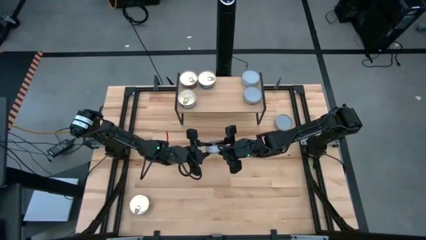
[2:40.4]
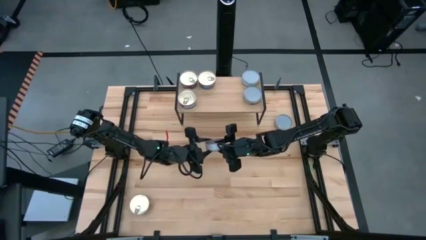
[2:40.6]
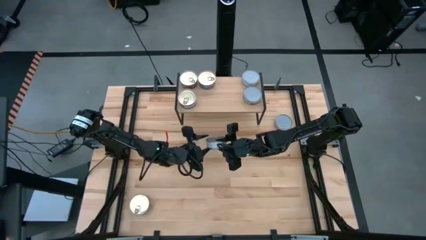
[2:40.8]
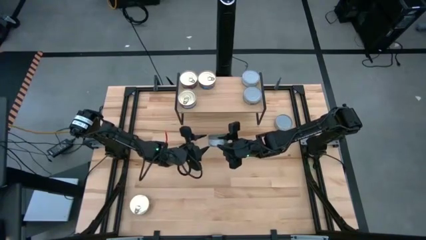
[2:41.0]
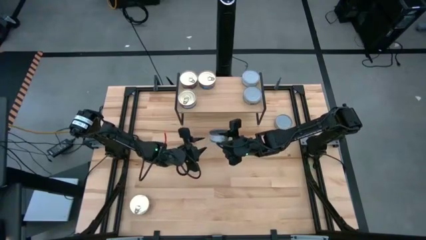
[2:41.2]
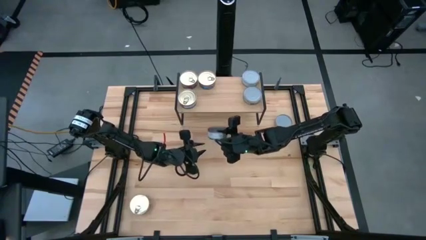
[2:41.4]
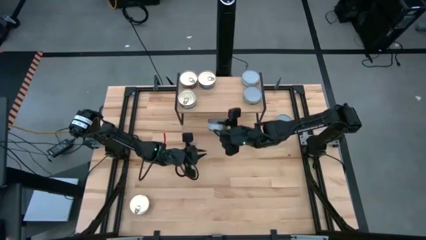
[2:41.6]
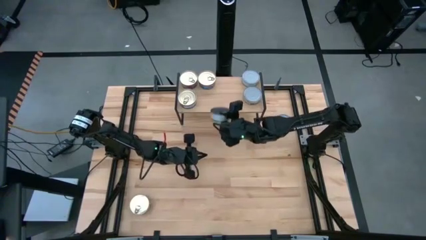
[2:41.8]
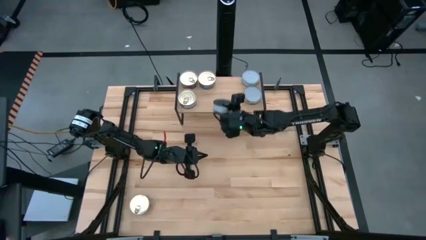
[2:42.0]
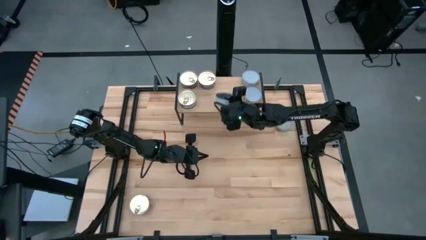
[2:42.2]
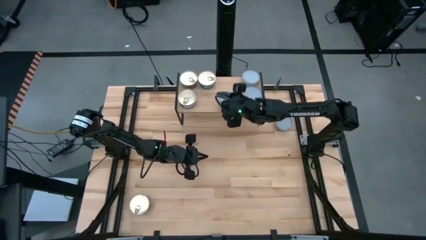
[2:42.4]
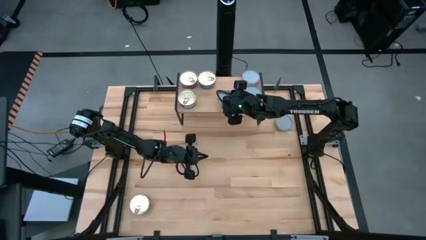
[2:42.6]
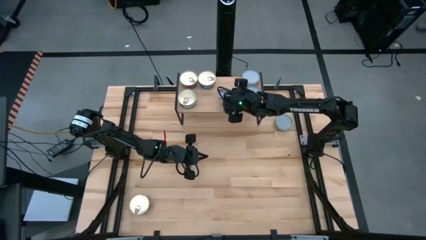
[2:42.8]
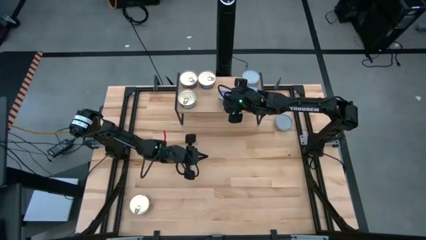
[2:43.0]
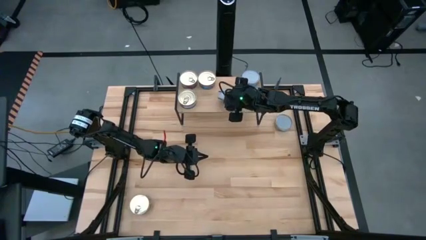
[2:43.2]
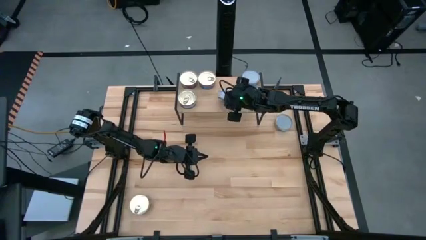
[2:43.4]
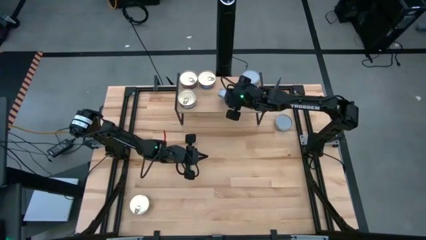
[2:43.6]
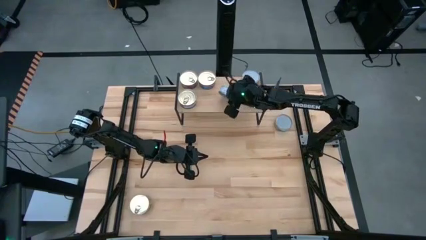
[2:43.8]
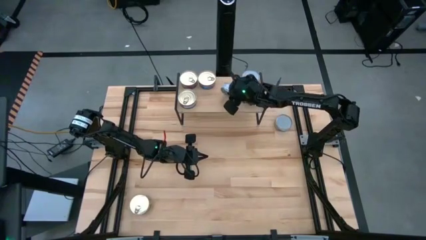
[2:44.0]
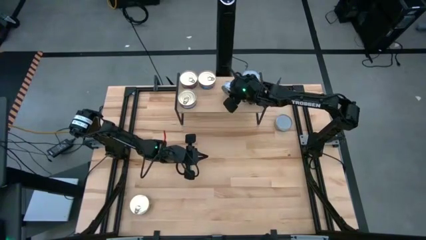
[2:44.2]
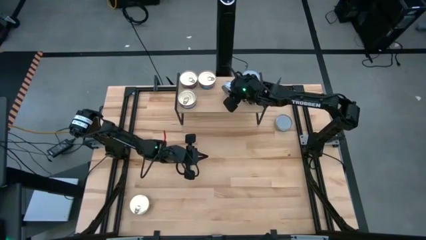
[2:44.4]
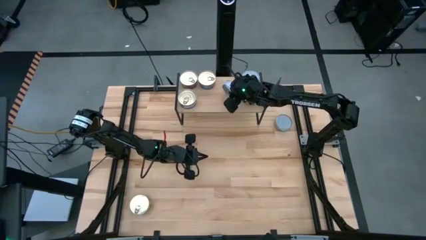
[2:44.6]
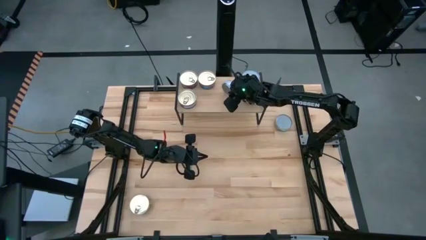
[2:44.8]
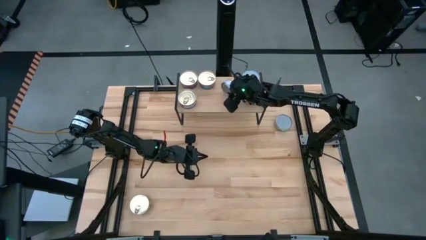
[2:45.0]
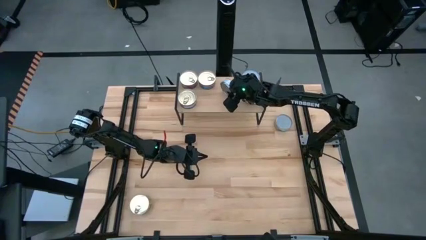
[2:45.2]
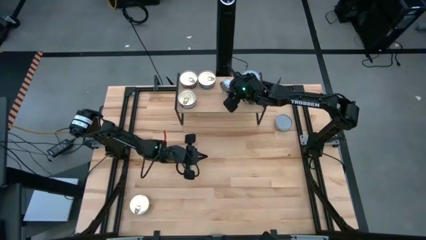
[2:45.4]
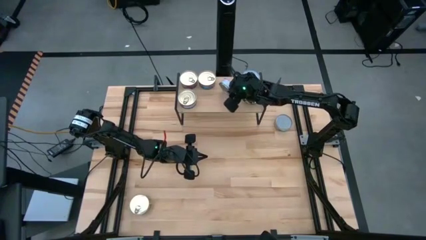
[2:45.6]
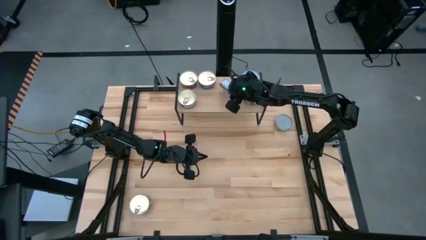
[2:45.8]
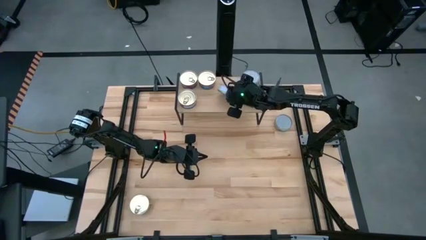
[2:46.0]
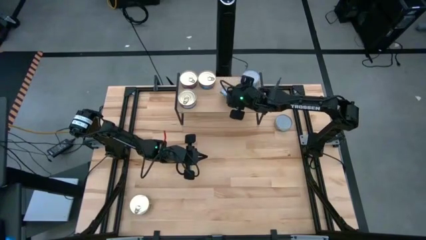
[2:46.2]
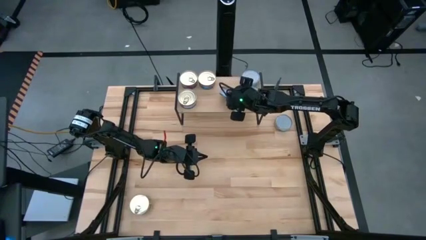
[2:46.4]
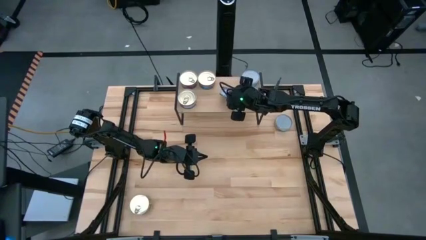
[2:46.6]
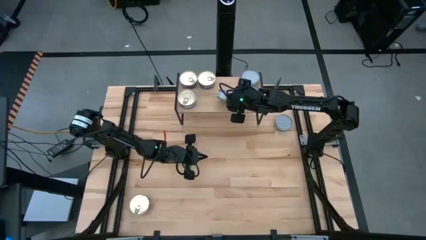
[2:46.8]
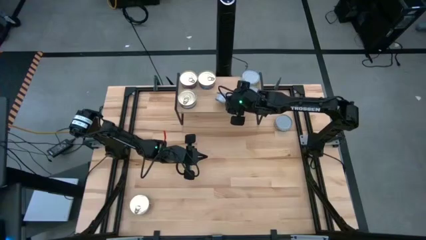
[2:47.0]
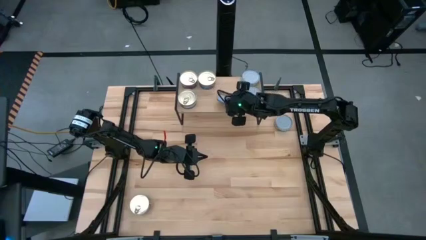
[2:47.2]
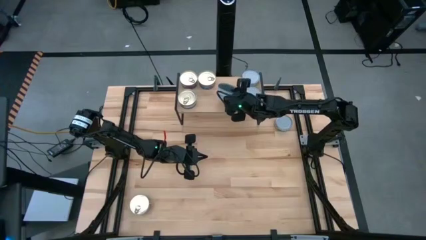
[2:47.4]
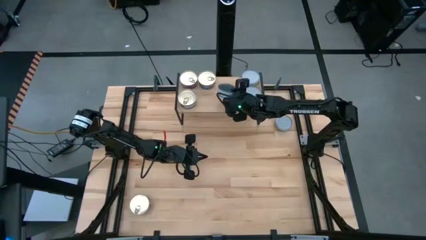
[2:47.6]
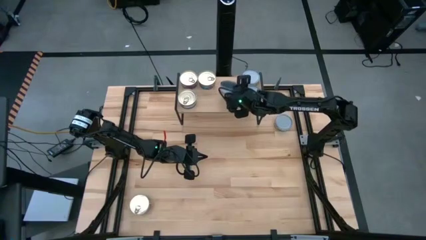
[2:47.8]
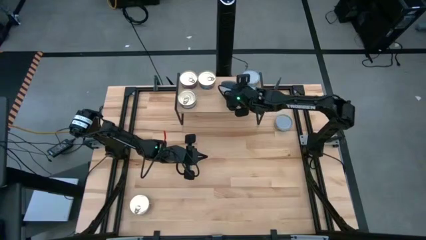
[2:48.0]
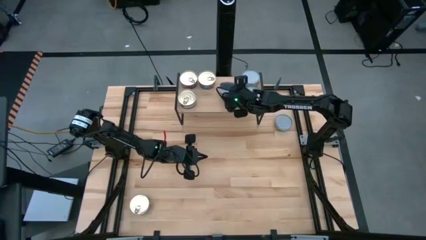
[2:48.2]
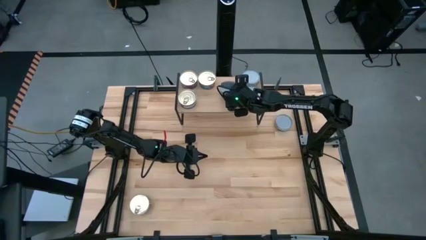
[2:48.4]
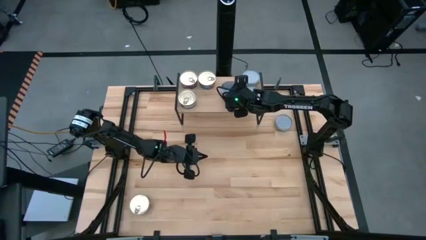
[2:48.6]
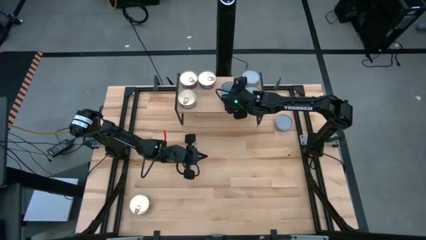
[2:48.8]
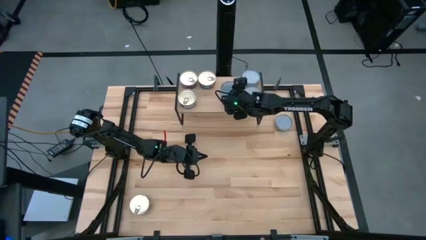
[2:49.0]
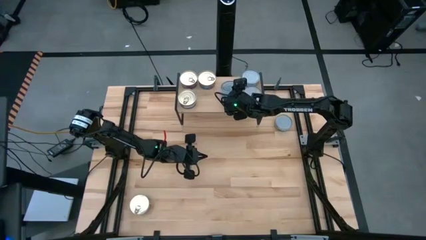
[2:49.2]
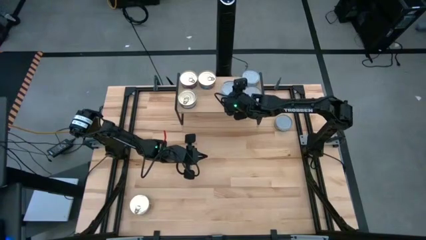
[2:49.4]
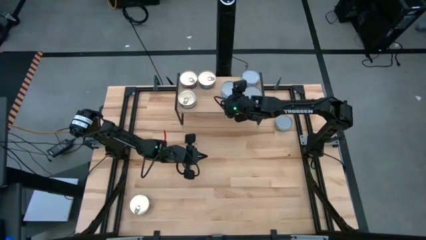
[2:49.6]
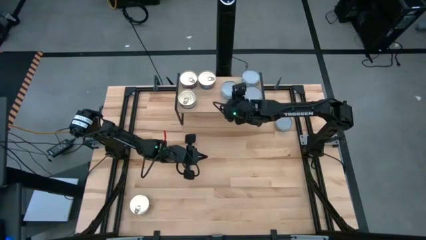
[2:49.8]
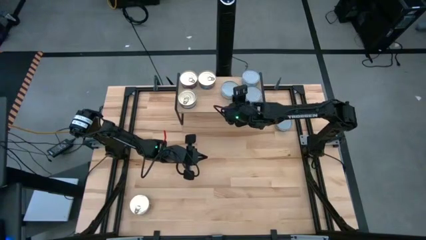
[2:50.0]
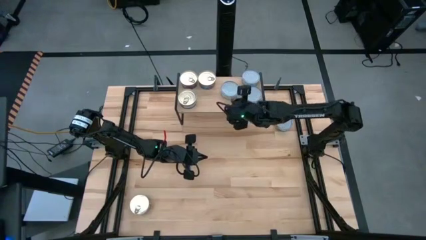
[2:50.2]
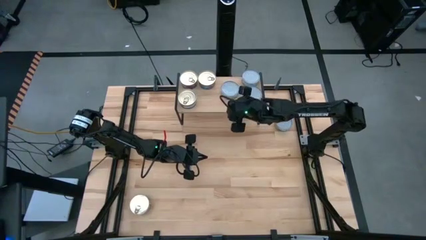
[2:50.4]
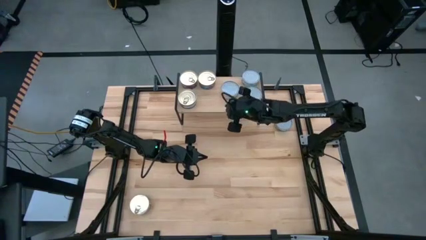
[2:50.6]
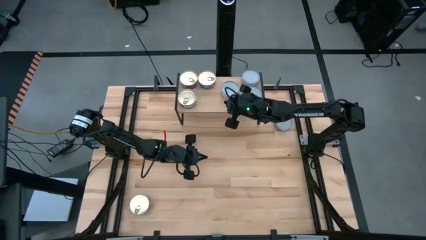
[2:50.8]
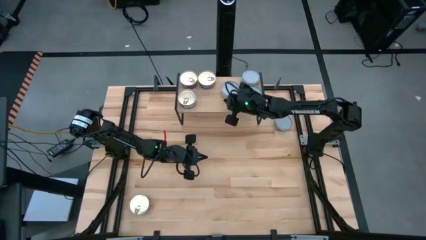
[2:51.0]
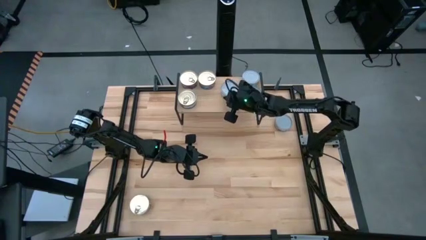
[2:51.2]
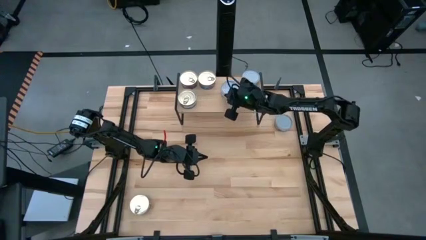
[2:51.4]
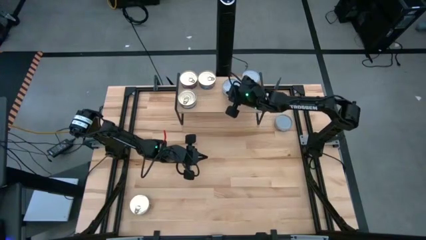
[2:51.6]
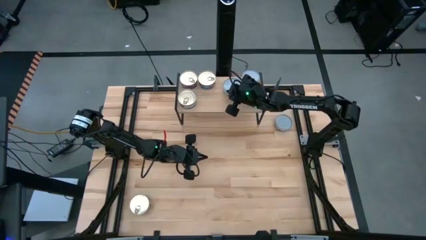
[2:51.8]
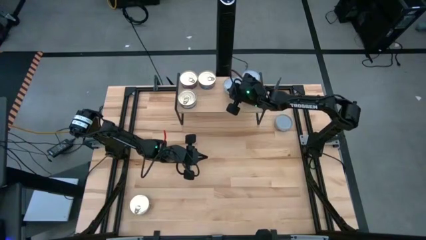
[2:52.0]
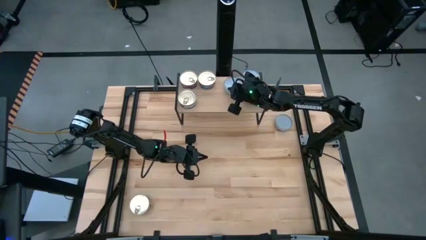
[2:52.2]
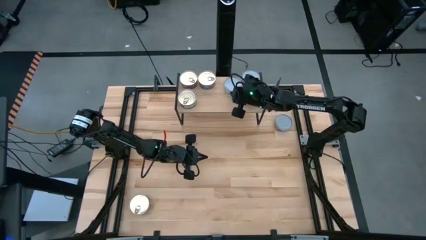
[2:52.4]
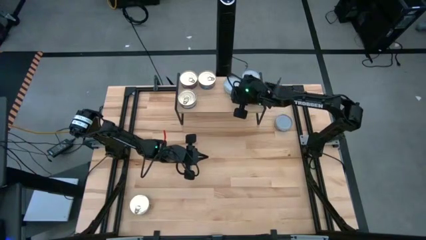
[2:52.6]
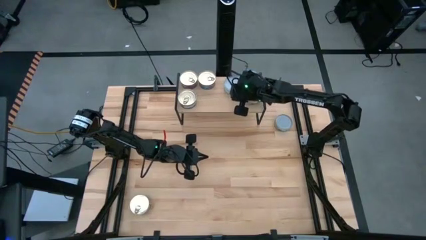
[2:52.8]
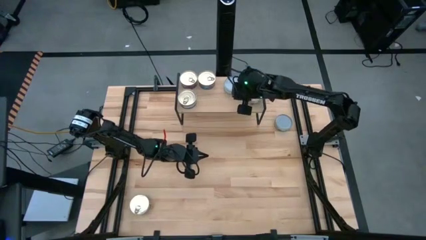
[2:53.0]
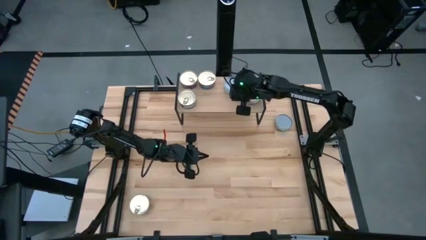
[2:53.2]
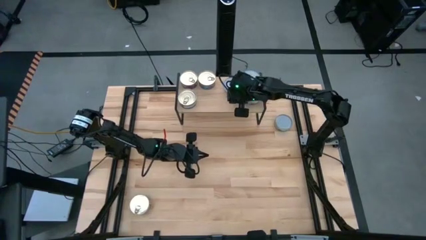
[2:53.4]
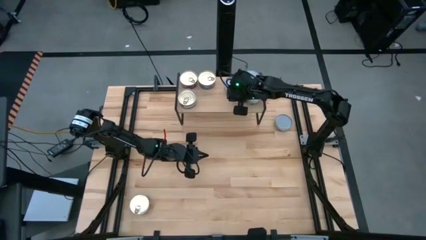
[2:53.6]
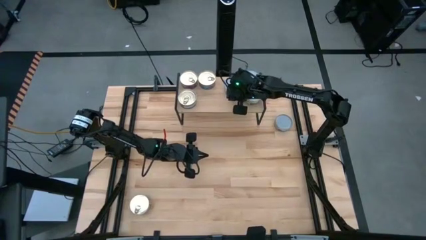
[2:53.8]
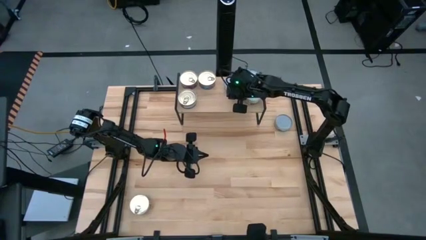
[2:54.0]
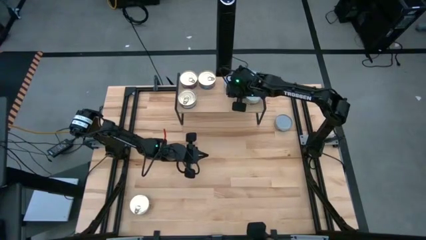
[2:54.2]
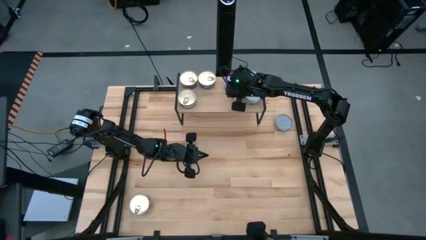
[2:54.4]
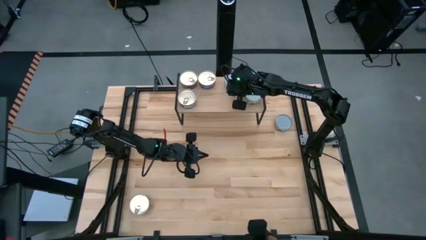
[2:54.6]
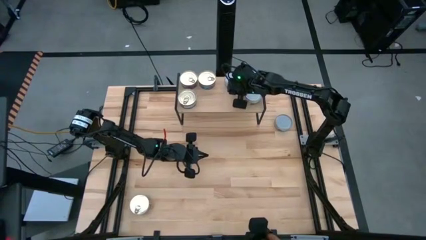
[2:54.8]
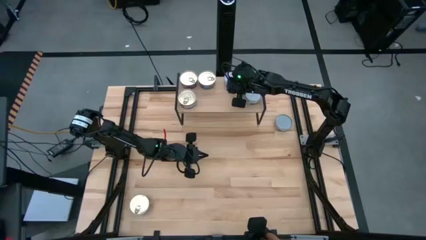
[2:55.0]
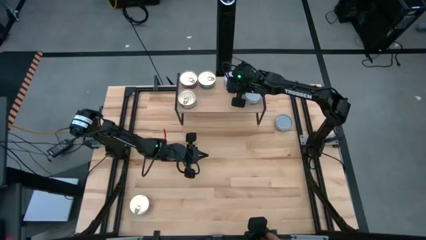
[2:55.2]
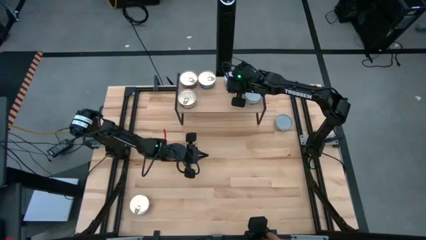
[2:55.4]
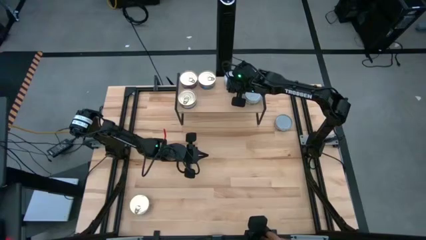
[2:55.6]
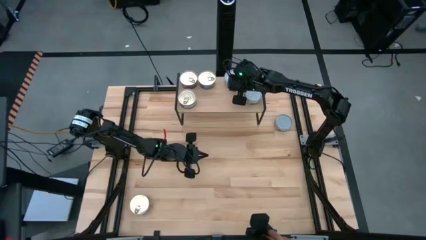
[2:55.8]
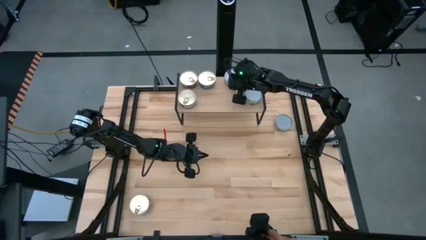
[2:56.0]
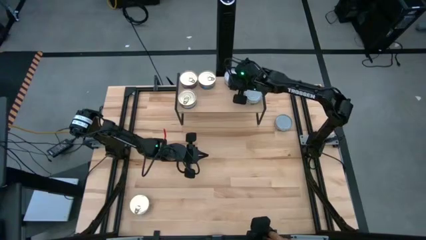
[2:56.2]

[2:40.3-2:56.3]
Task: Stack canned seafood by type on shelf
Put the left green tuna can on the shelf
